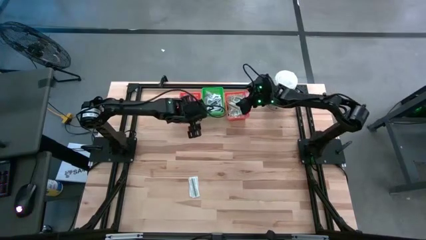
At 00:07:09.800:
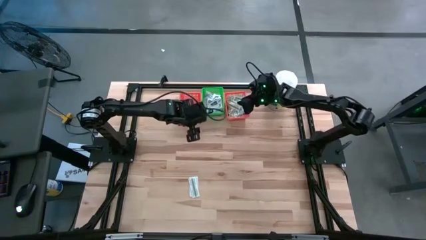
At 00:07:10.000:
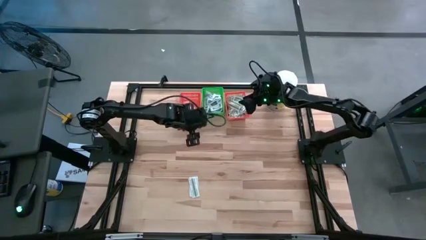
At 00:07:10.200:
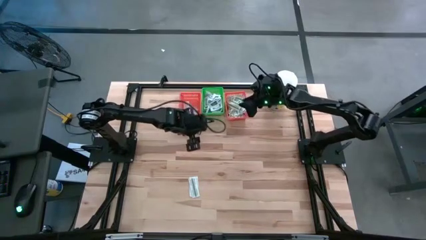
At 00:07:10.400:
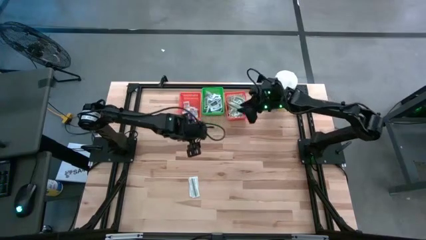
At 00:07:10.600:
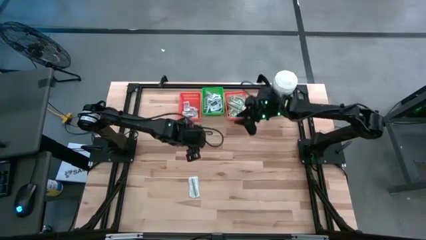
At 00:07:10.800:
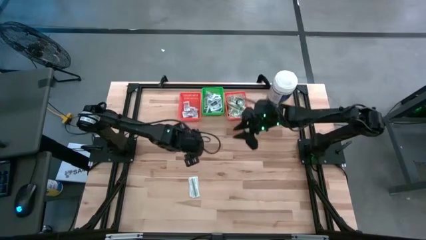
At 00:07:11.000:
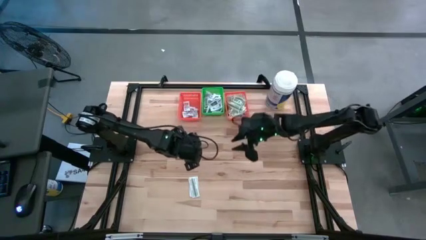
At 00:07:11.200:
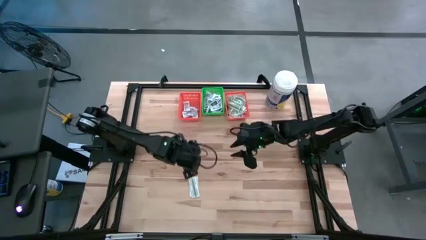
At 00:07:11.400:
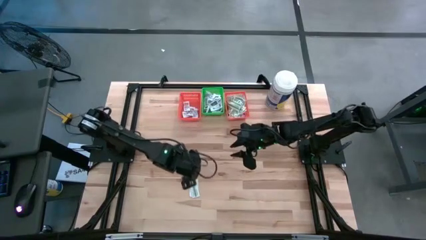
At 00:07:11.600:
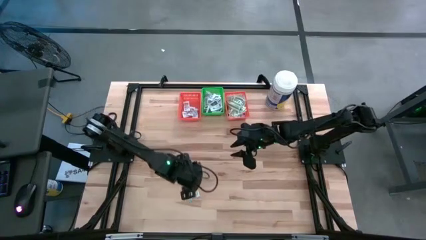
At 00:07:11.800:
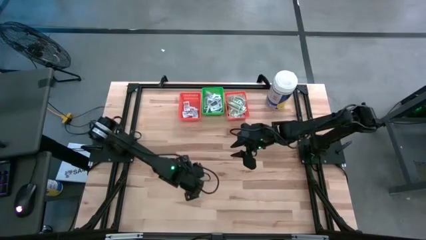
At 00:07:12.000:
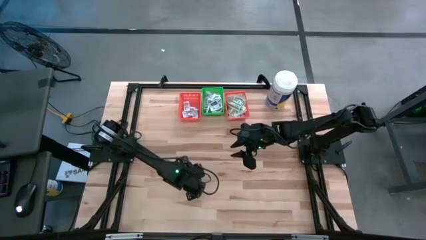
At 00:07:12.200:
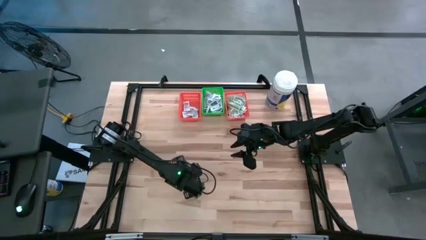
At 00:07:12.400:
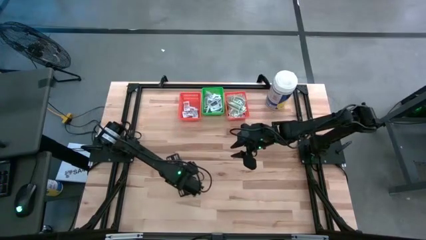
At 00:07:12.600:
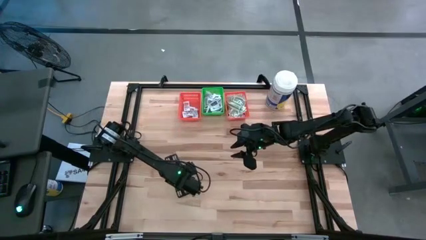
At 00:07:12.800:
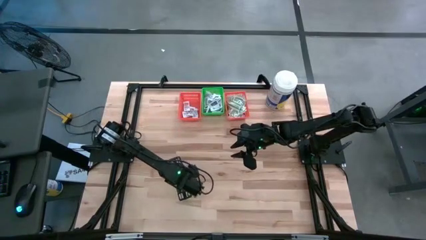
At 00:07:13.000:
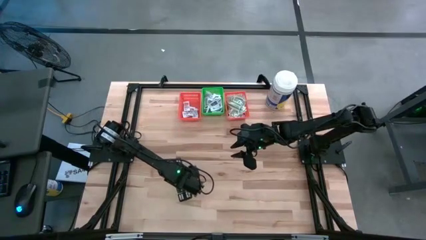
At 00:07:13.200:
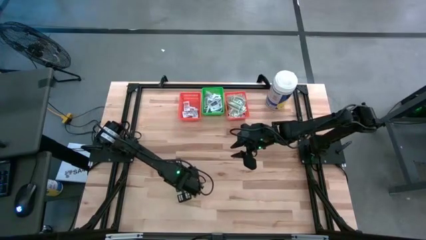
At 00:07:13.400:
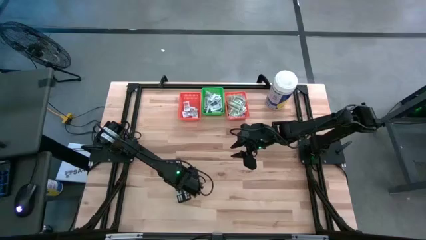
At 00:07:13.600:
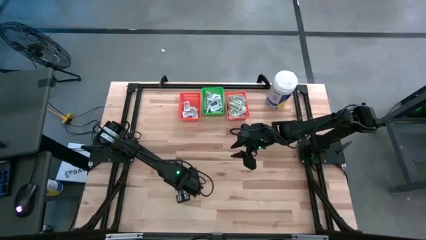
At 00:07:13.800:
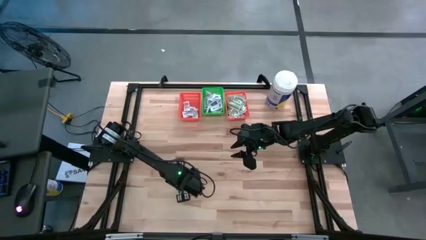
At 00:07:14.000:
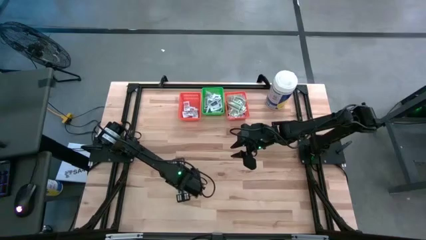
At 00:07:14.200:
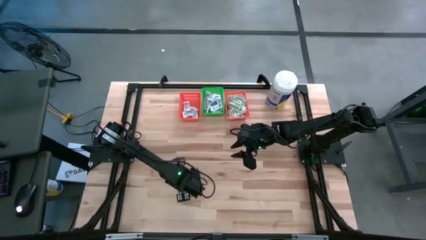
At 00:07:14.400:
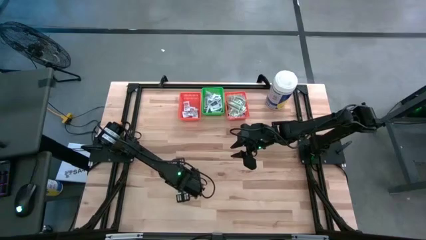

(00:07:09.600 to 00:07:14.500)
Task: Pick & Place First Aid Supplies
Put the top bandage pack into the right orange bin

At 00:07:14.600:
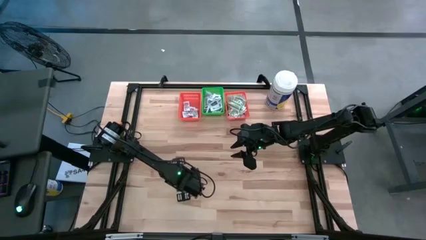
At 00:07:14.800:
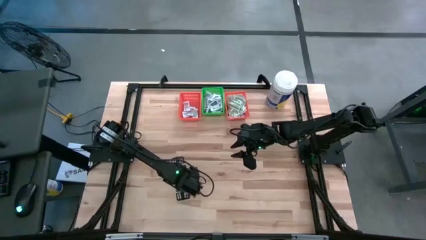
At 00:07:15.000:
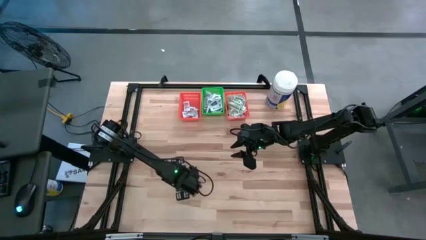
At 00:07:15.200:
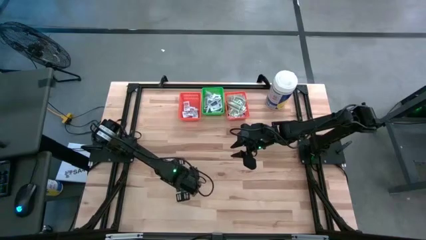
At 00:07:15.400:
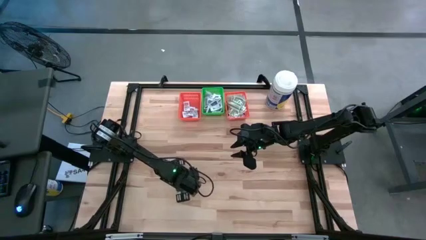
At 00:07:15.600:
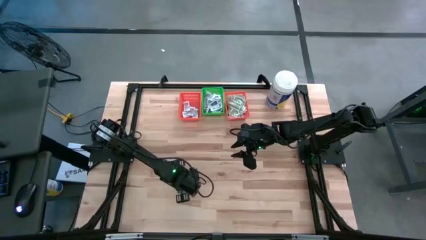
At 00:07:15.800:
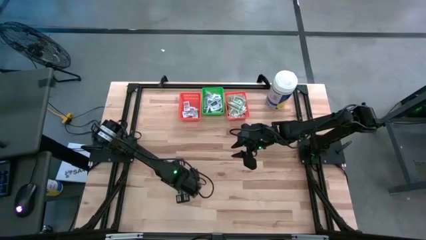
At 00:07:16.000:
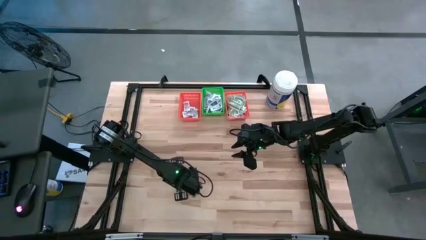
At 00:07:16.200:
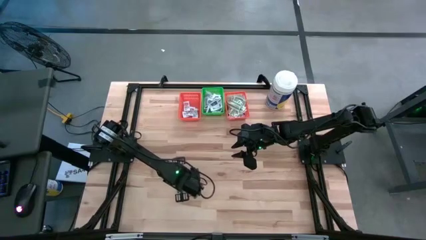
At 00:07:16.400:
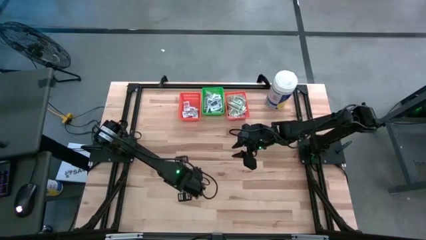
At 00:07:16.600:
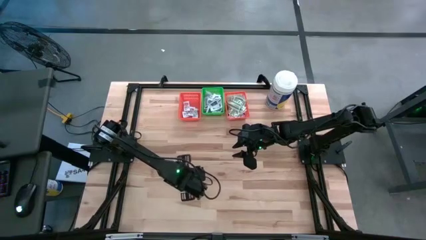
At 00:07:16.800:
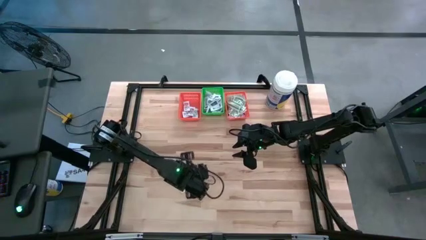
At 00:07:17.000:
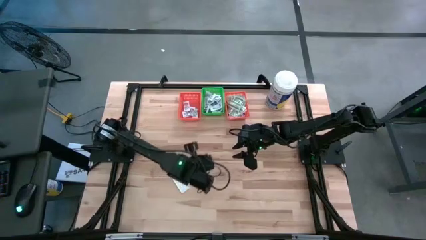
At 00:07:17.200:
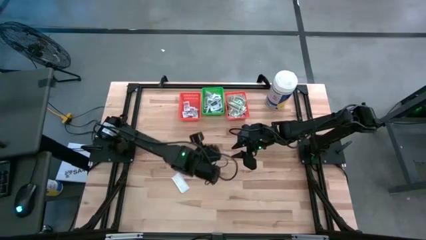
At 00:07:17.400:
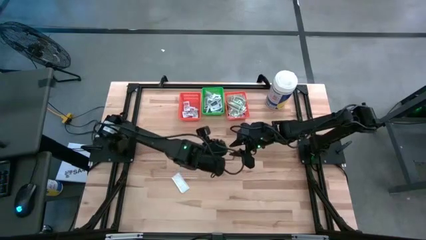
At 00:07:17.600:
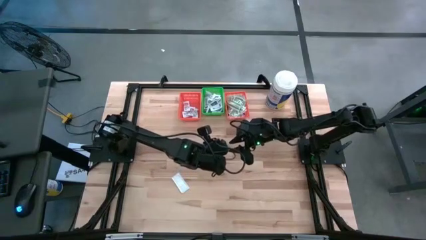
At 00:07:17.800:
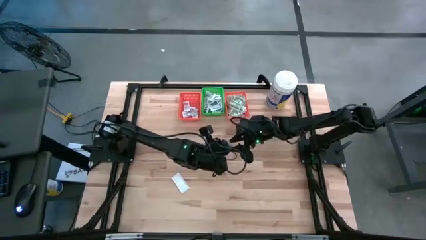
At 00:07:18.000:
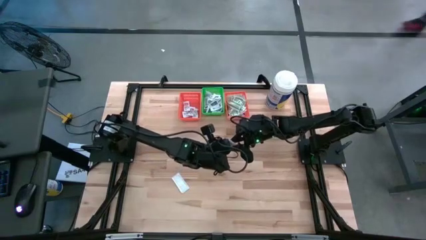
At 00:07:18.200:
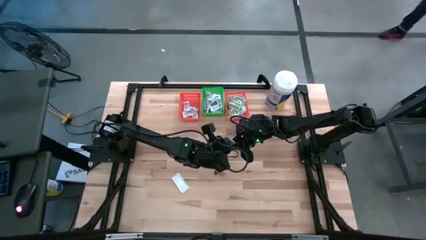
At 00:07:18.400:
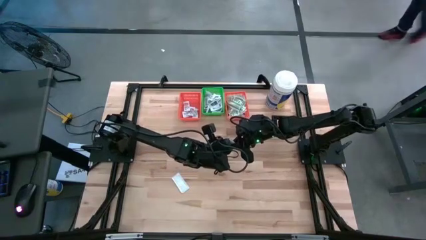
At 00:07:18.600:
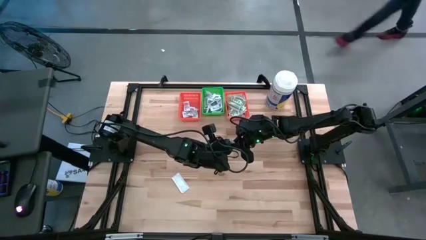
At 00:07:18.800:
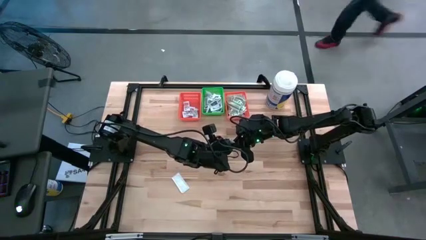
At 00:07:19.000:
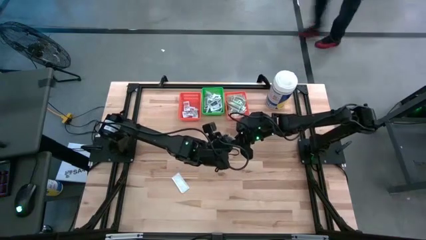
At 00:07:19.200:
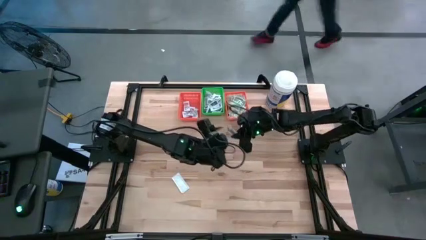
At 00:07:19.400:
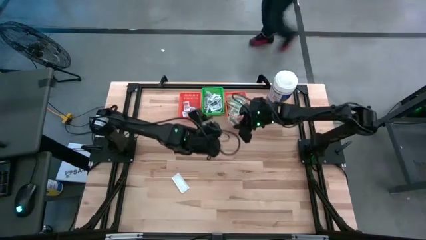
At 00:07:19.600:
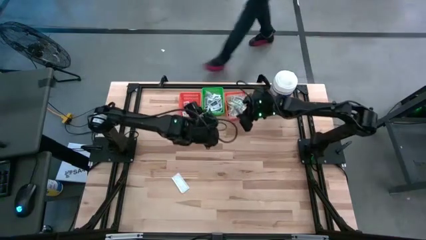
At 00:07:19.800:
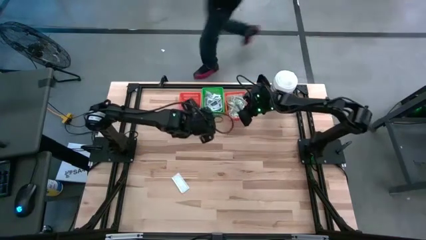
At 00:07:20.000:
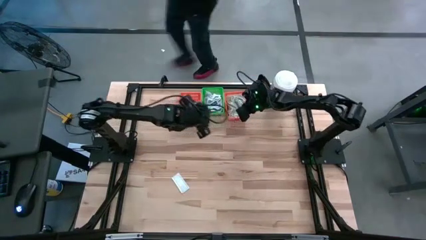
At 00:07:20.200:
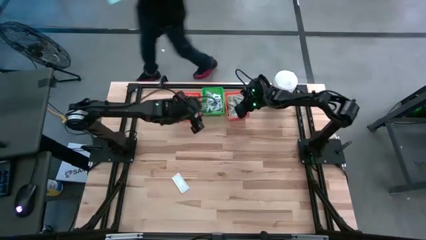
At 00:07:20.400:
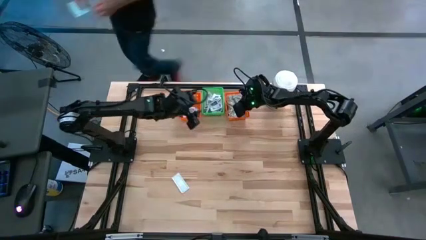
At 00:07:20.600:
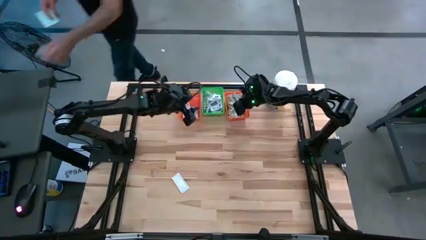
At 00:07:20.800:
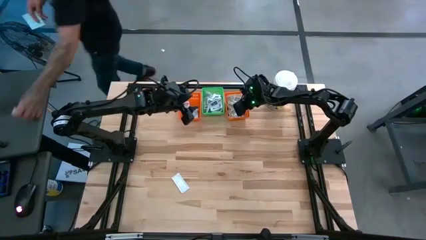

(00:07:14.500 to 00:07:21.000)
Put the top bandage pack into the right orange bin
